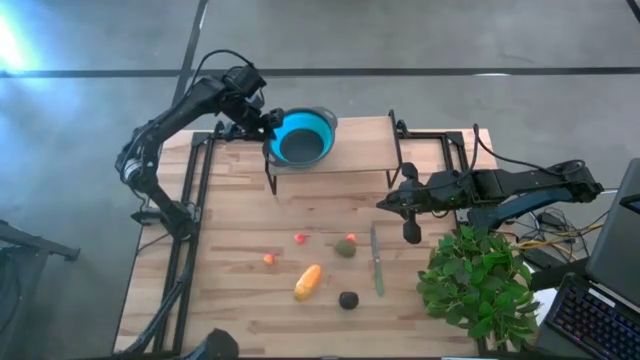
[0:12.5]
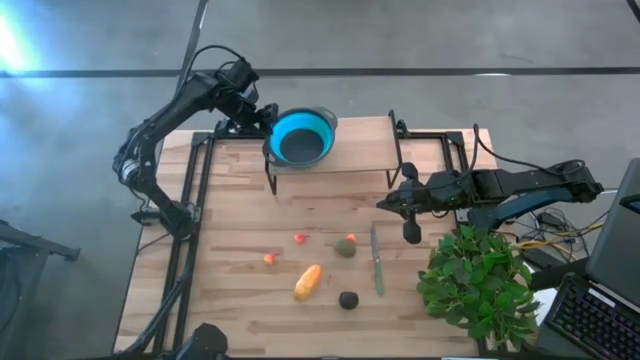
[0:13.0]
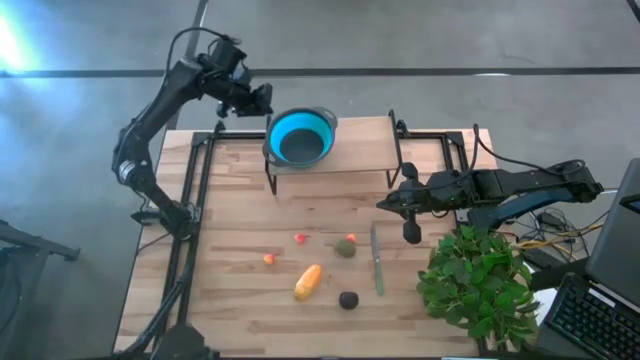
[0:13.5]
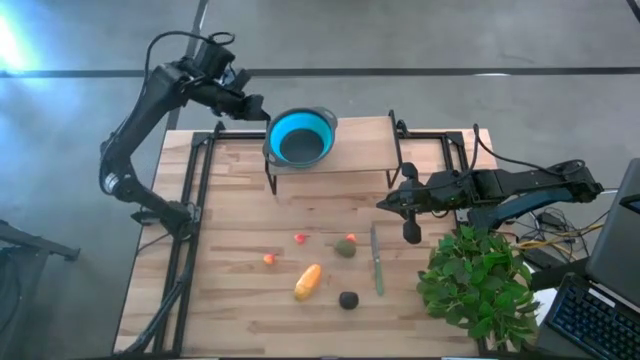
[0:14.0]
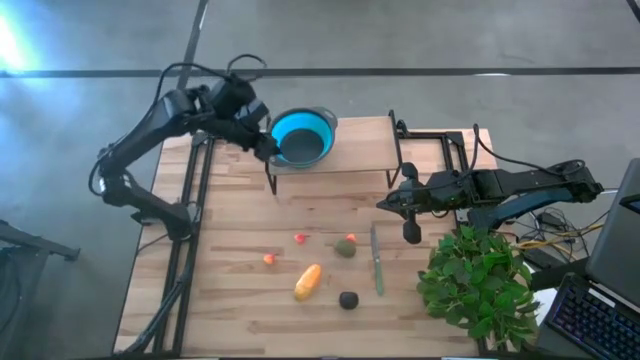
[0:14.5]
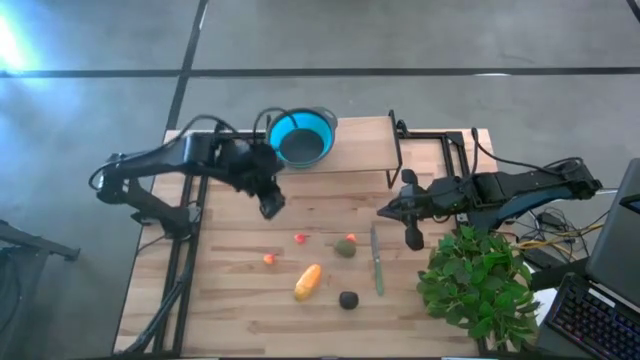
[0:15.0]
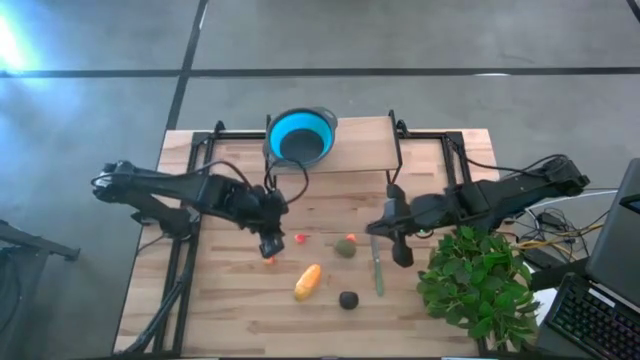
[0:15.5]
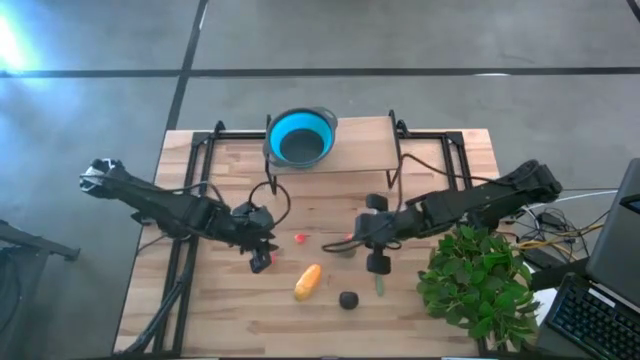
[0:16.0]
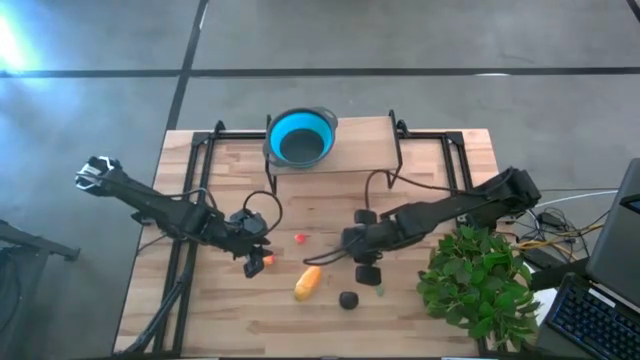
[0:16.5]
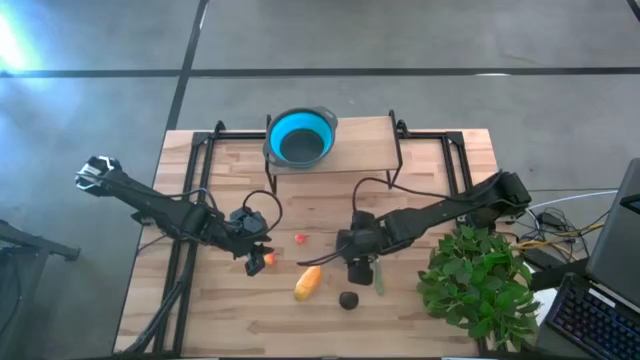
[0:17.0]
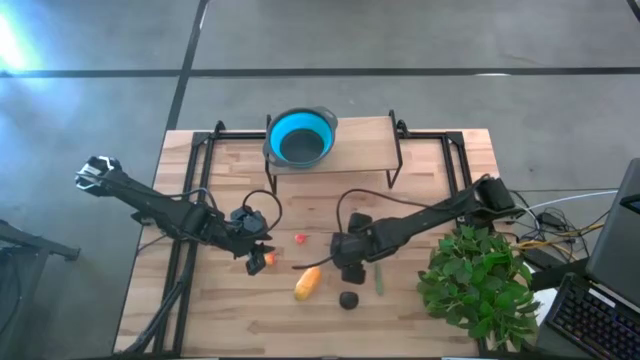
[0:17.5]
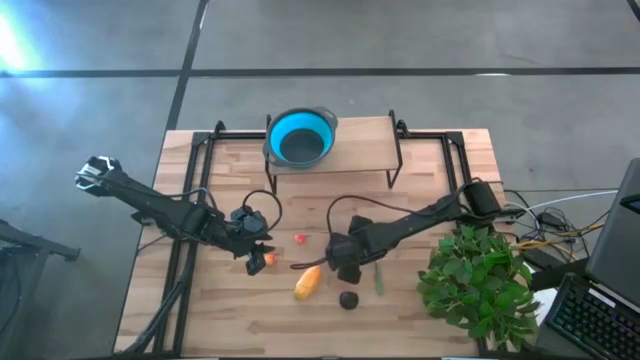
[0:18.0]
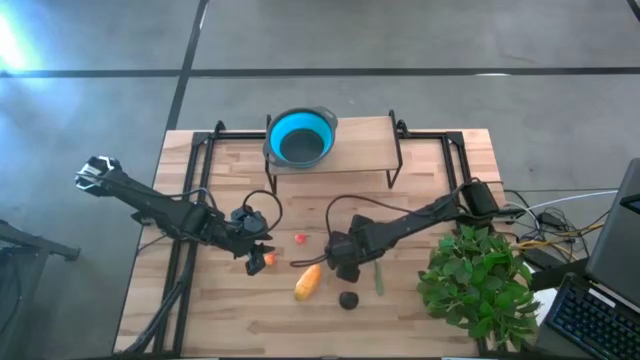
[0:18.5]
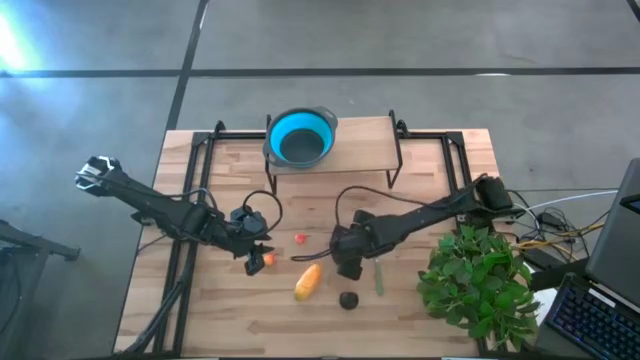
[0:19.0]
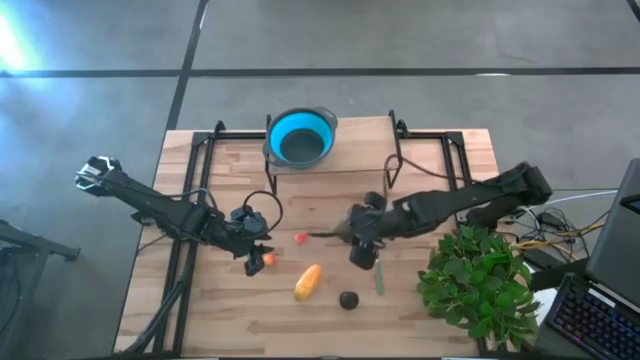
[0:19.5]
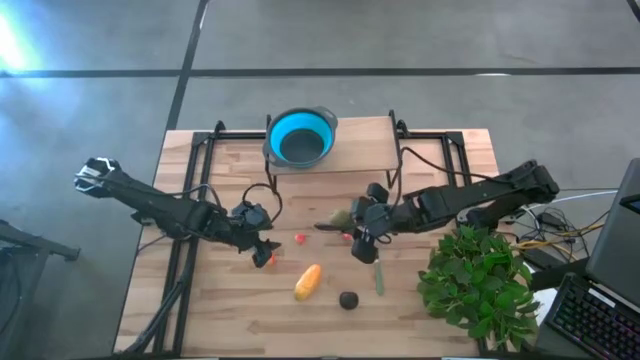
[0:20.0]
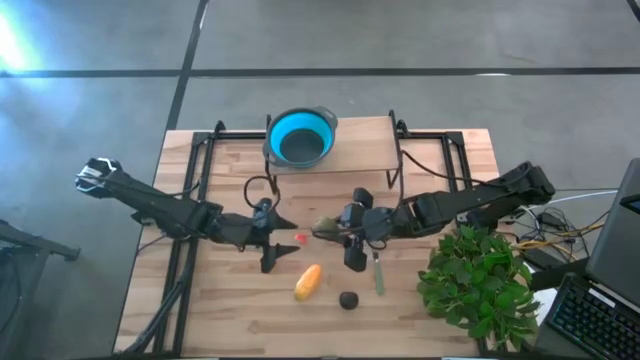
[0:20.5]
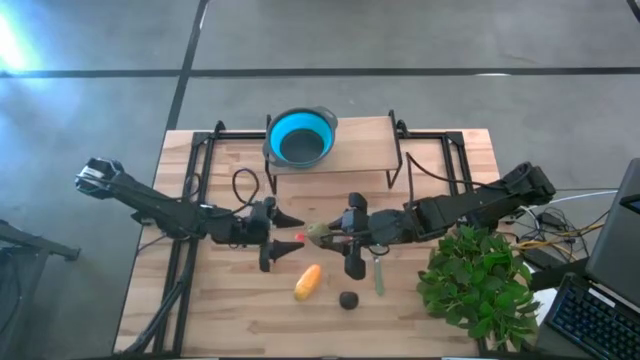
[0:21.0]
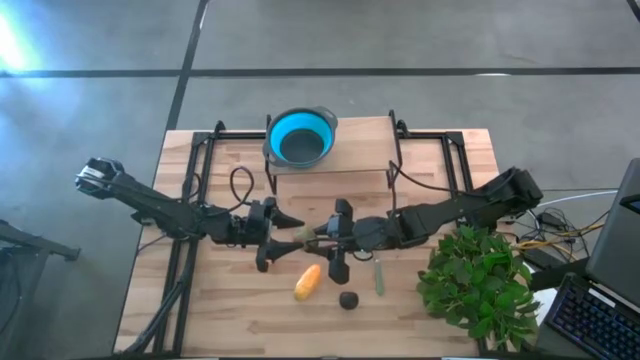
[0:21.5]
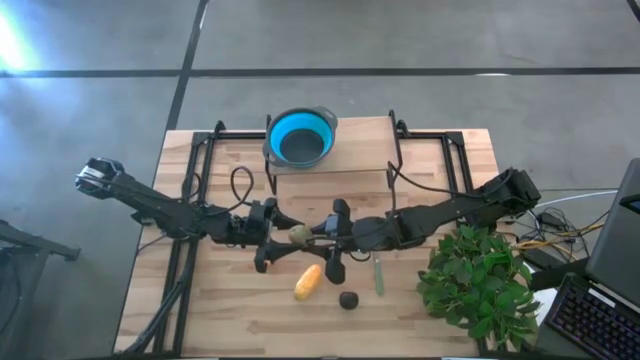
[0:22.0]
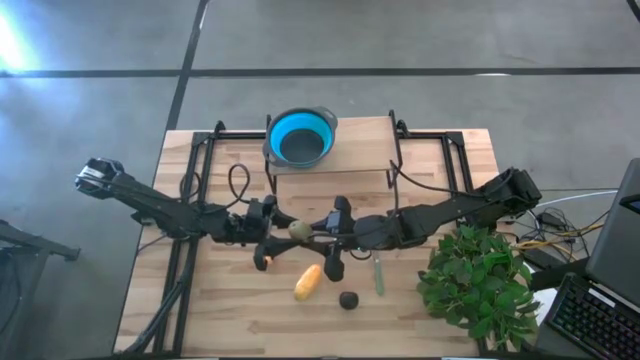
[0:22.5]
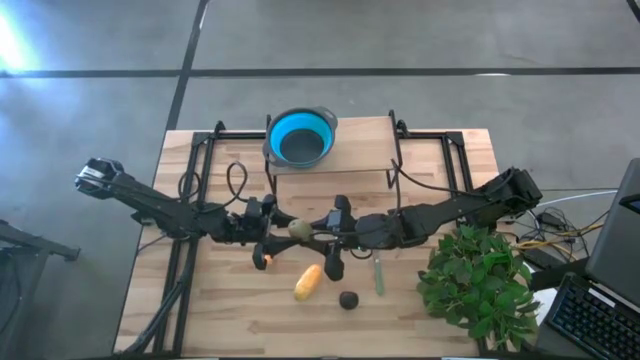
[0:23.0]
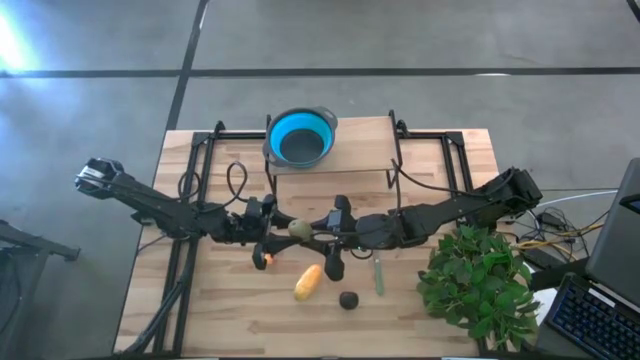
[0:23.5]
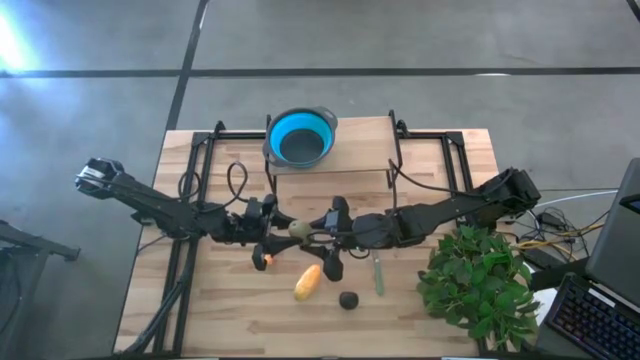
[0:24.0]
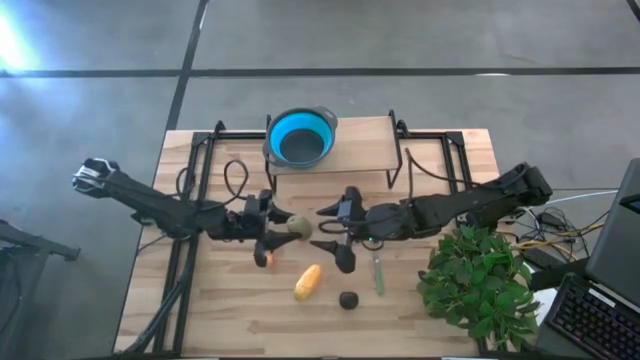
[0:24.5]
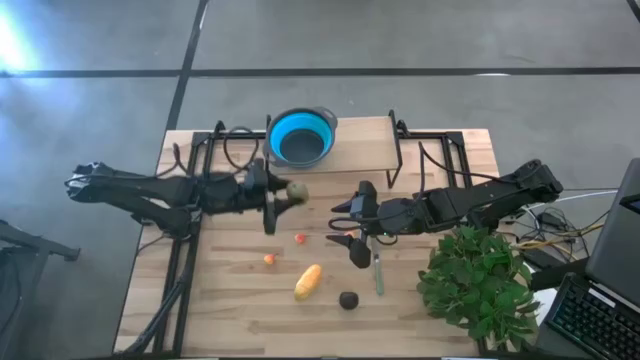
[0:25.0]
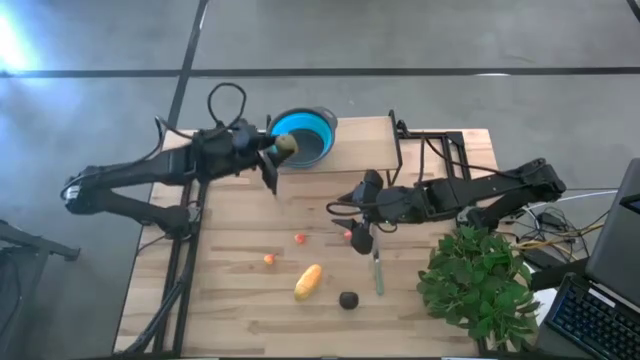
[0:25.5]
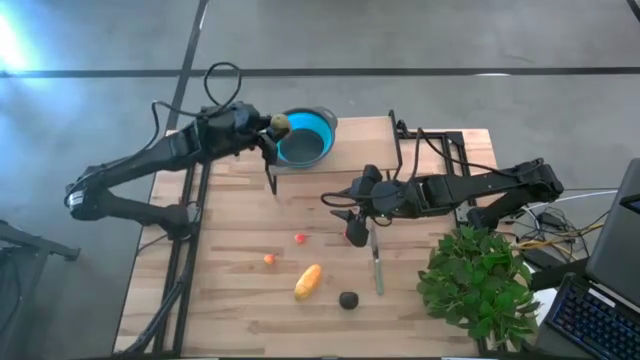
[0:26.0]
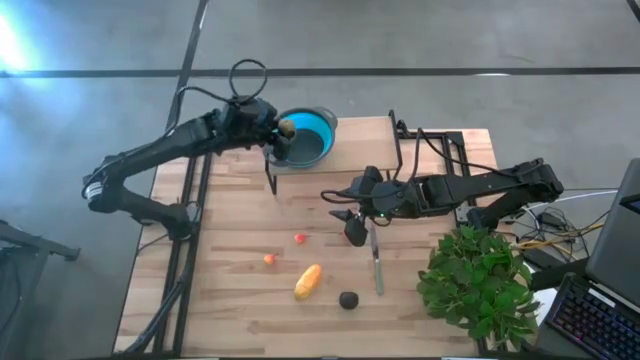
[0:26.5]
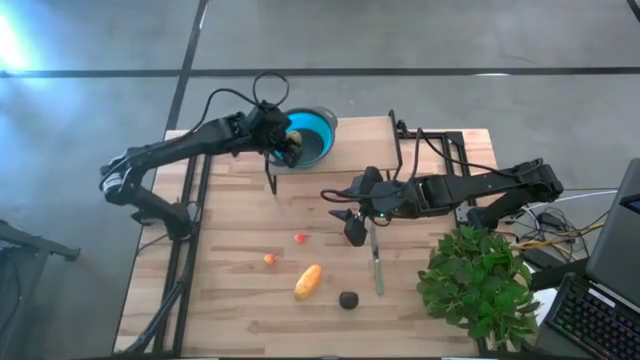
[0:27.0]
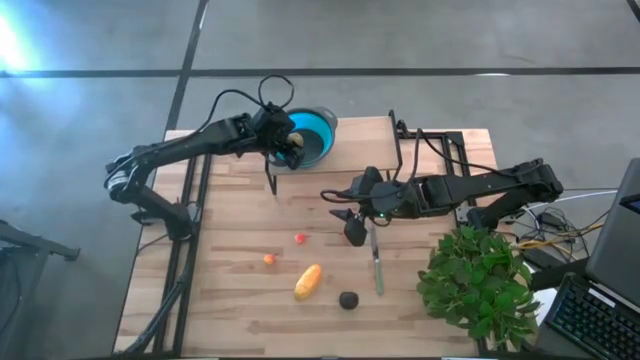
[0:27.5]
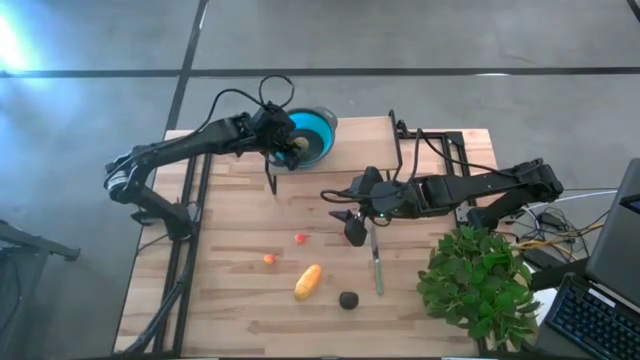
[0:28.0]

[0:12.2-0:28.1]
Task: Pick & Place Fruit
Put the green kiwi in the blue strainer bowl on the shelf

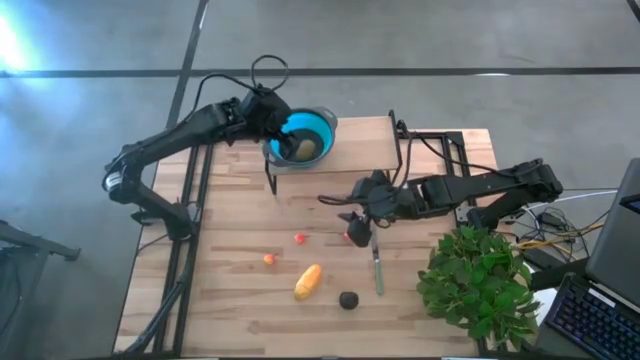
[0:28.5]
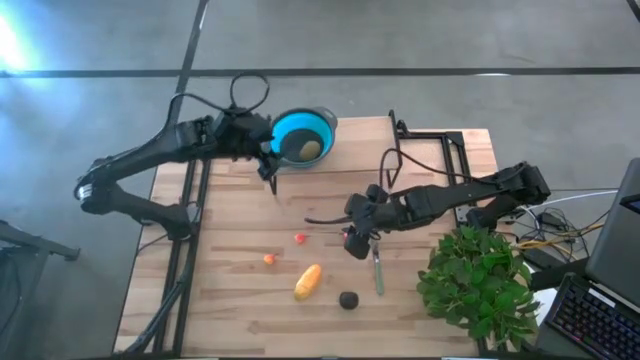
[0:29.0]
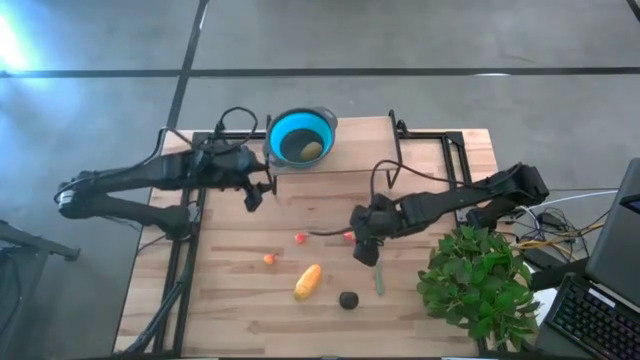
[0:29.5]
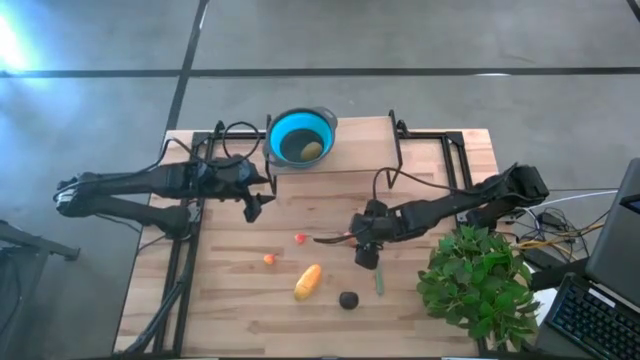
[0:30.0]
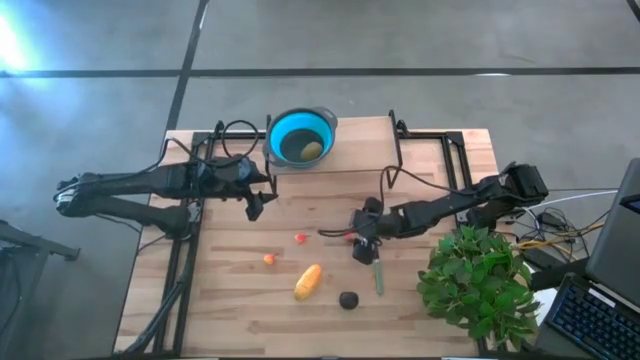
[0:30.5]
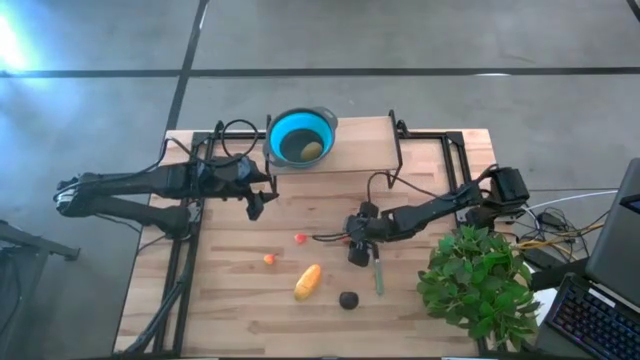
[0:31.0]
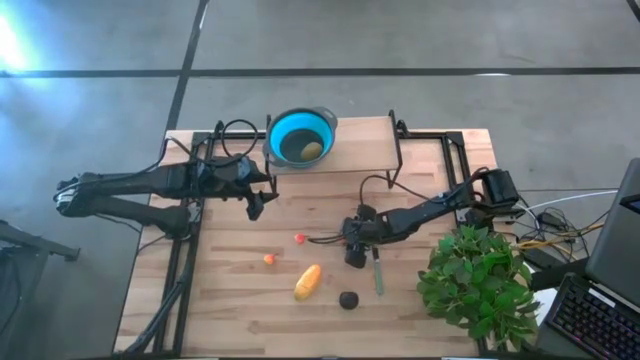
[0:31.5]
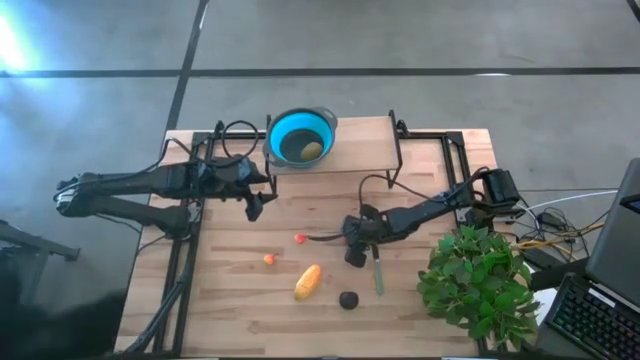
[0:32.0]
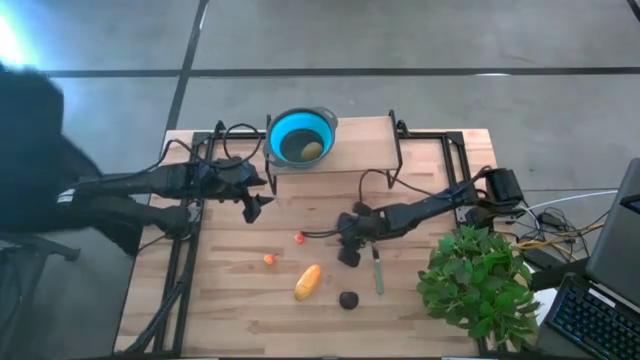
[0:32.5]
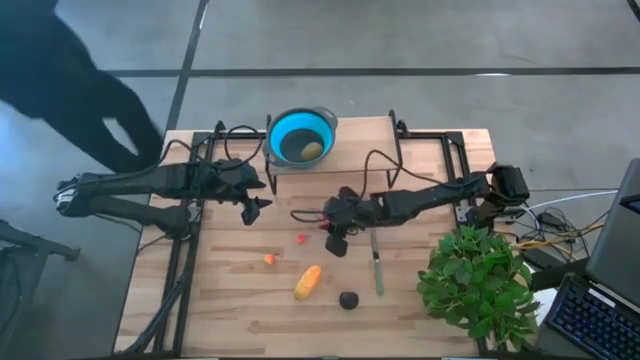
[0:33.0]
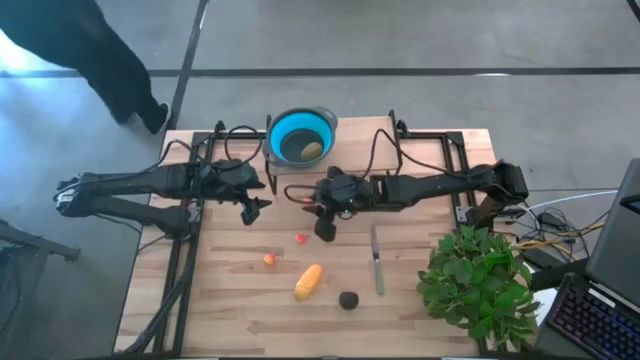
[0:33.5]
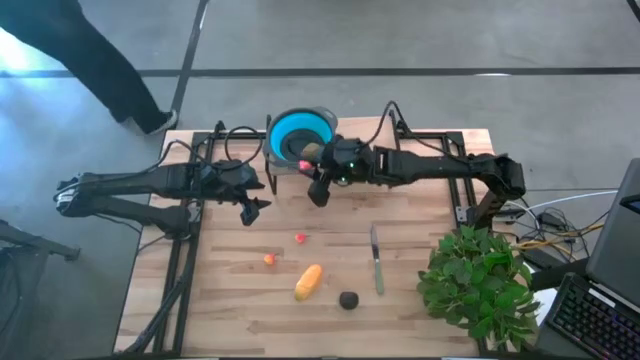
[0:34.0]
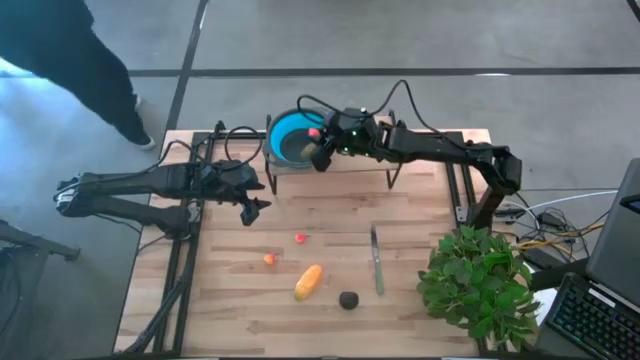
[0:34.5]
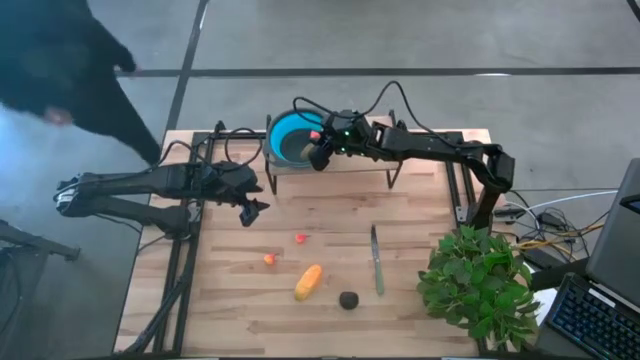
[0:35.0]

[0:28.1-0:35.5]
Put the right orange peach in the blue strainer bowl on the shelf
